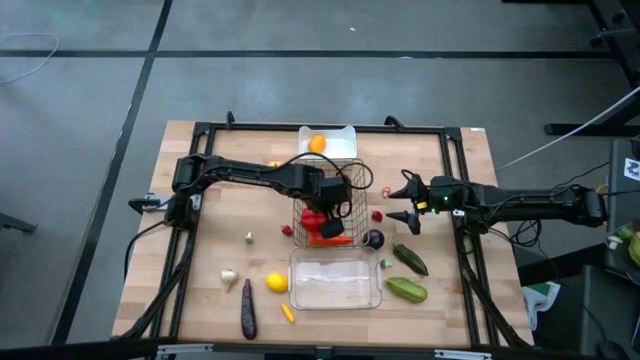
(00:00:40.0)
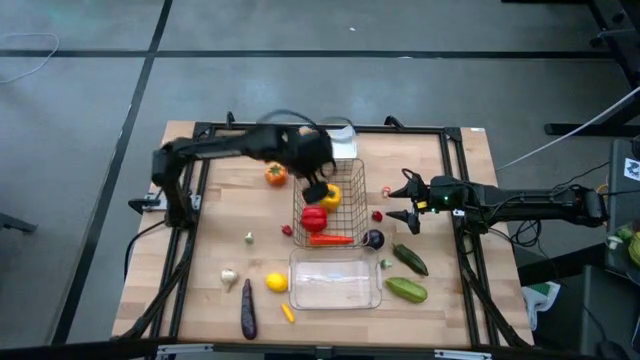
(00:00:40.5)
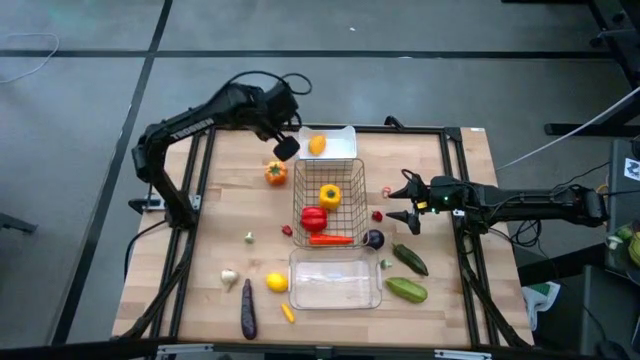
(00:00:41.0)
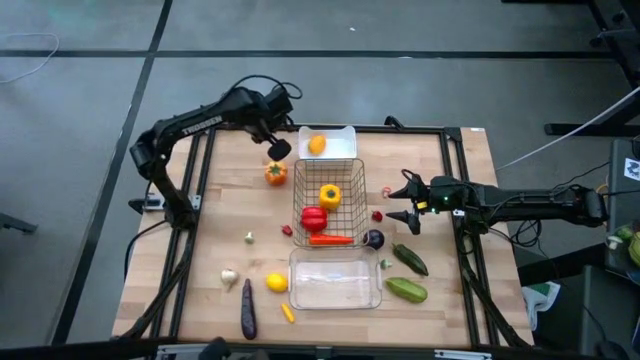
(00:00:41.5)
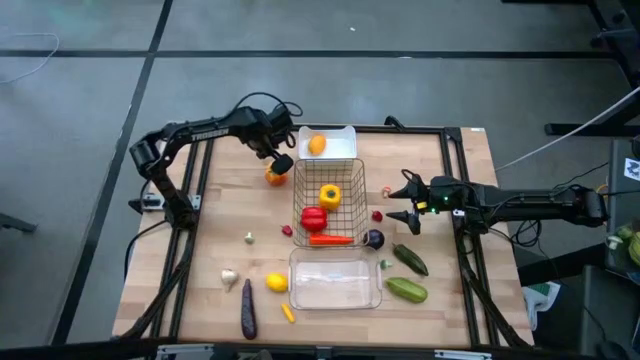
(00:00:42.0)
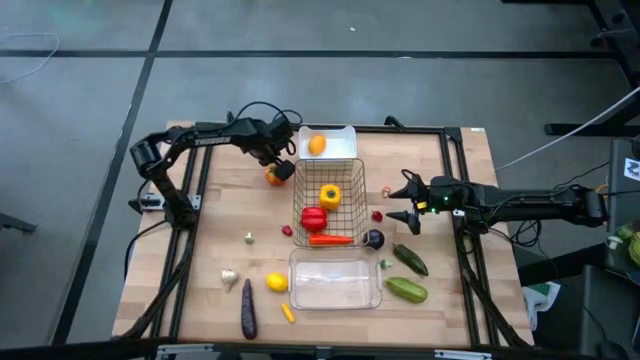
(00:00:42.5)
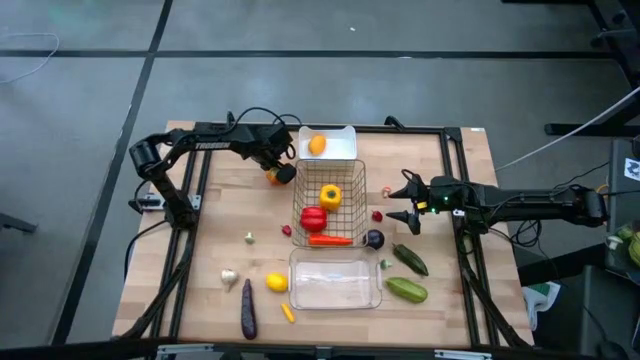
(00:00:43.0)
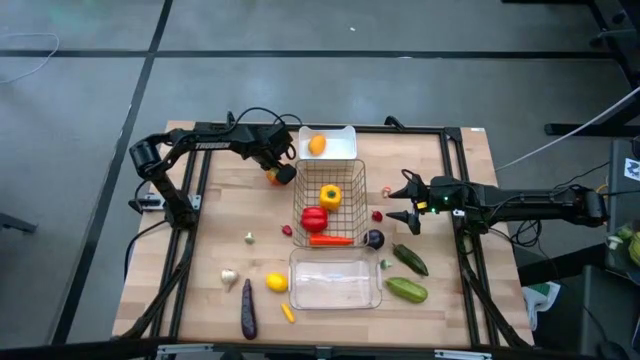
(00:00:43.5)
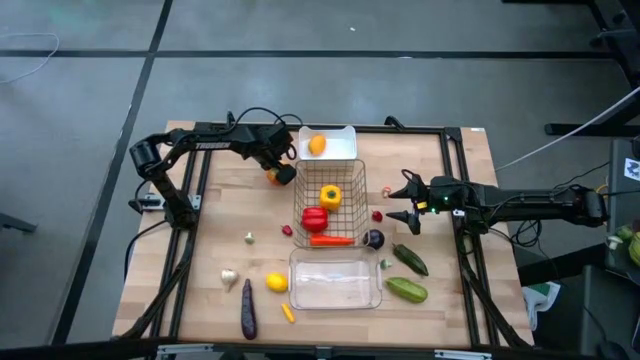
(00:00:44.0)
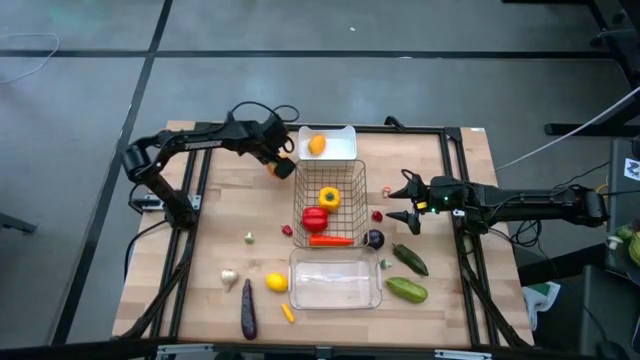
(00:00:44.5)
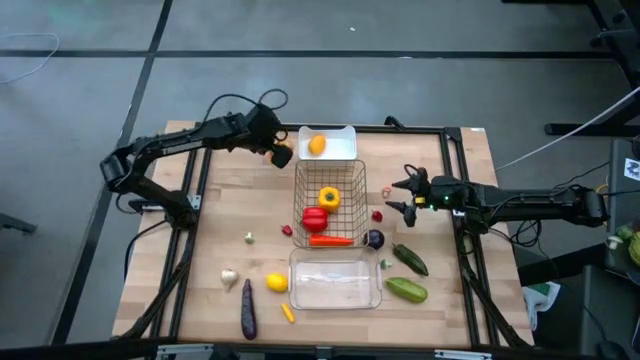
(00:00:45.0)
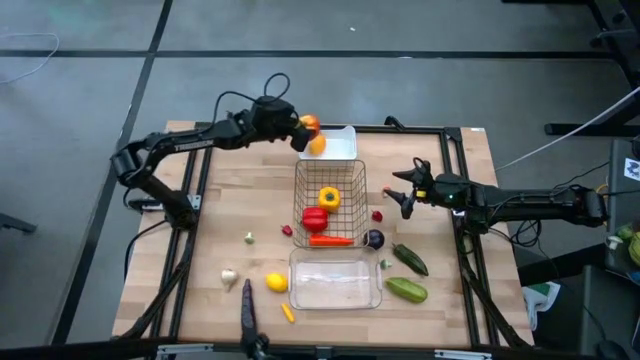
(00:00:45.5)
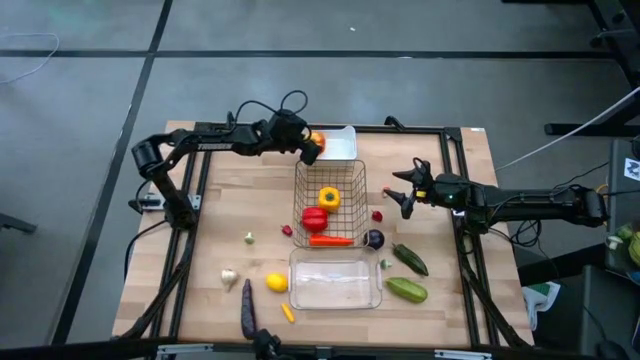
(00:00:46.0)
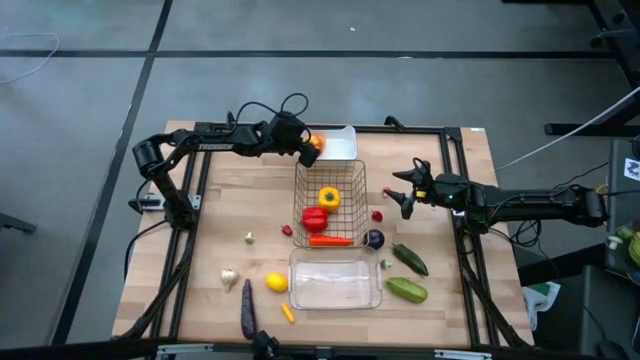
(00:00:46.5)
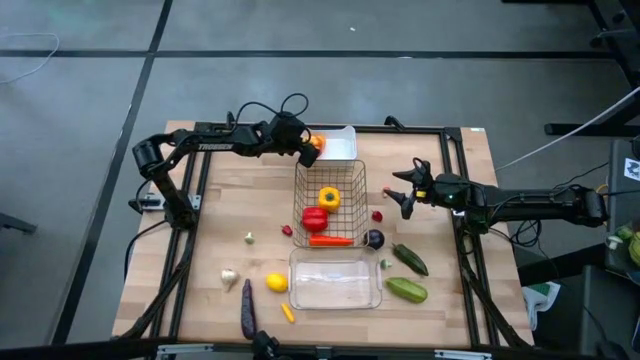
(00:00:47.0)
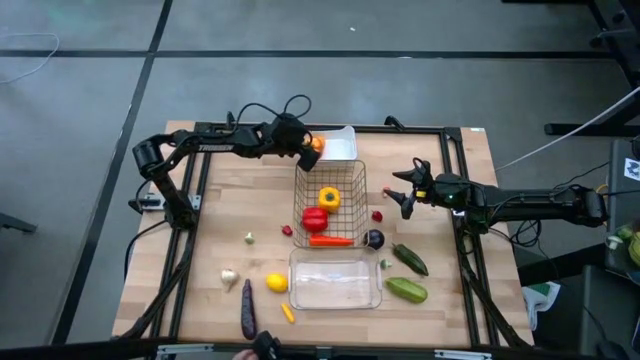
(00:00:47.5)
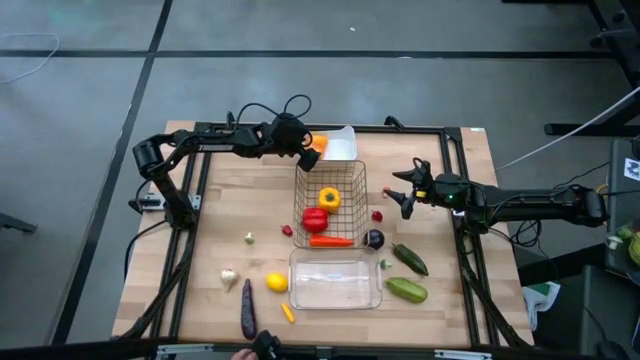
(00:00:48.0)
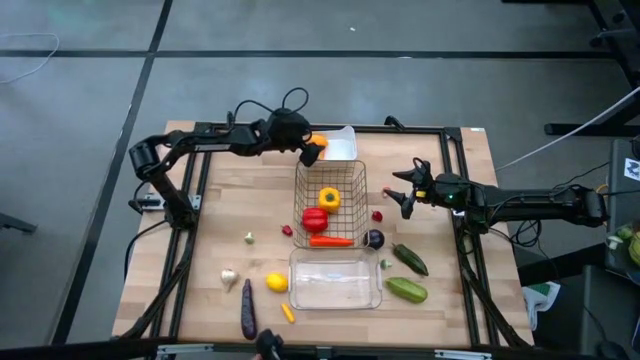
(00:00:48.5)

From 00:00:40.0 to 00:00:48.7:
Task: Sort produce into baskets
Put the yellow tomato into the white bin

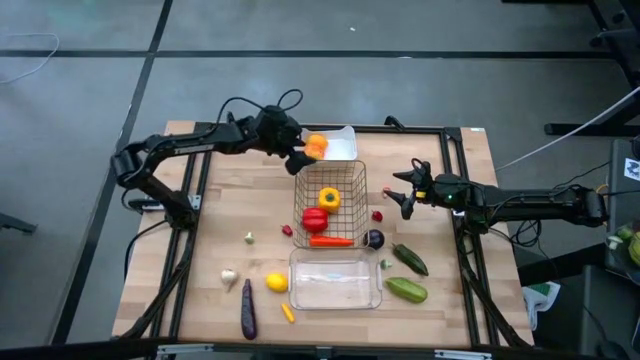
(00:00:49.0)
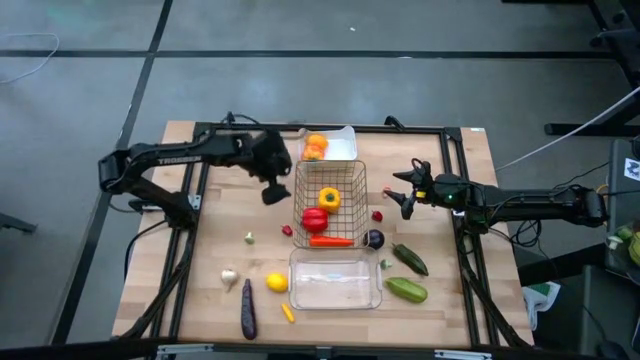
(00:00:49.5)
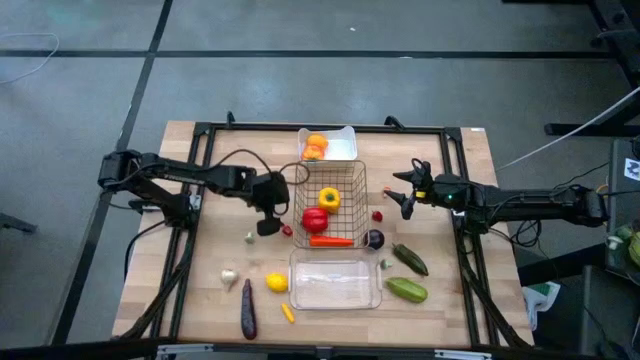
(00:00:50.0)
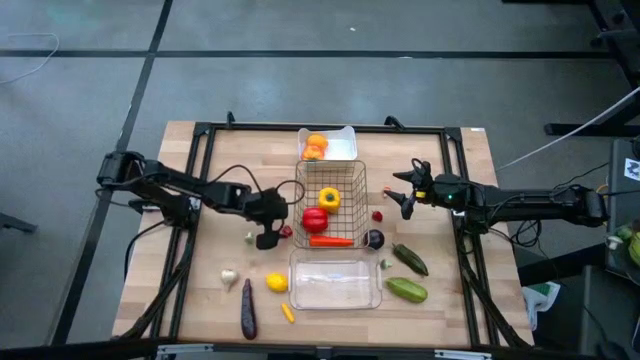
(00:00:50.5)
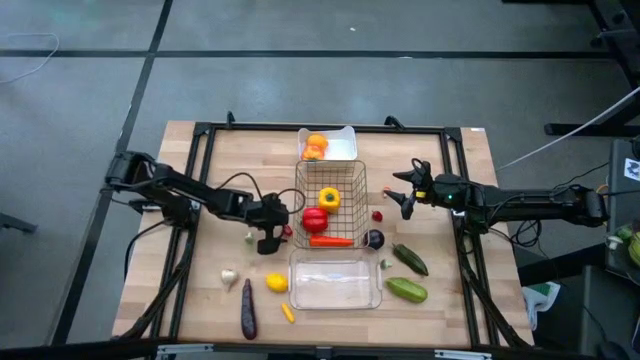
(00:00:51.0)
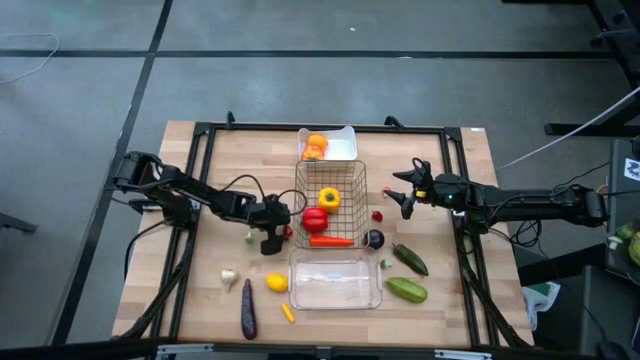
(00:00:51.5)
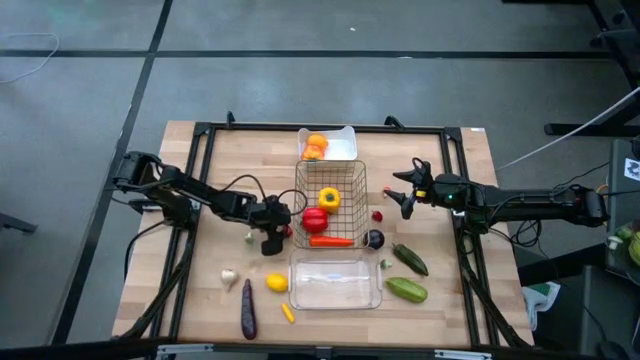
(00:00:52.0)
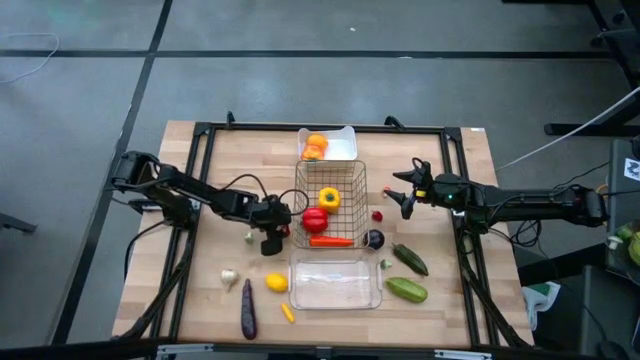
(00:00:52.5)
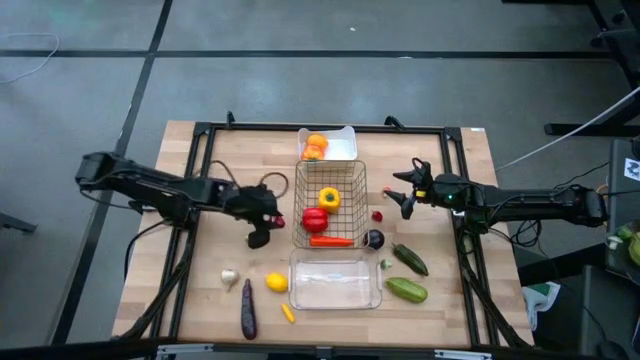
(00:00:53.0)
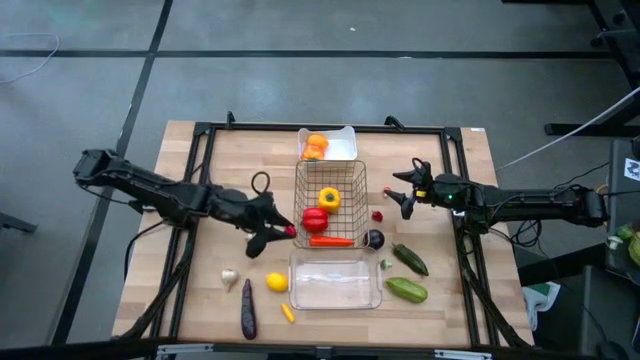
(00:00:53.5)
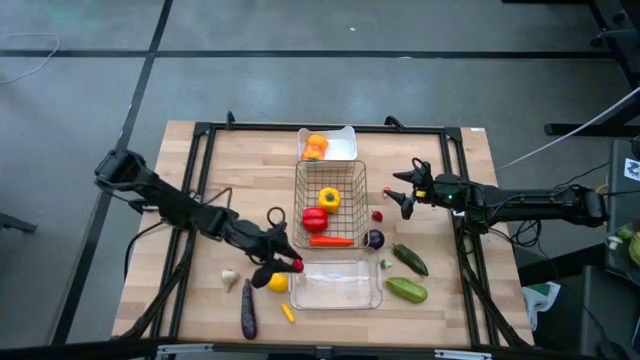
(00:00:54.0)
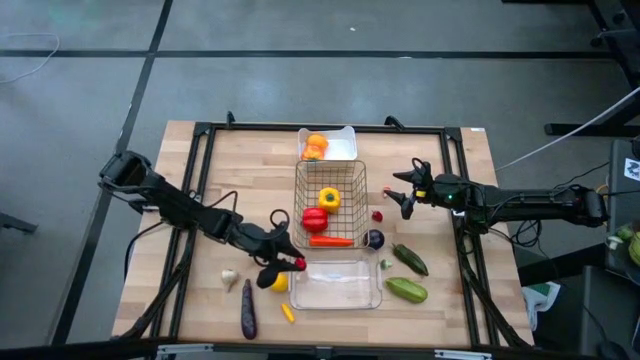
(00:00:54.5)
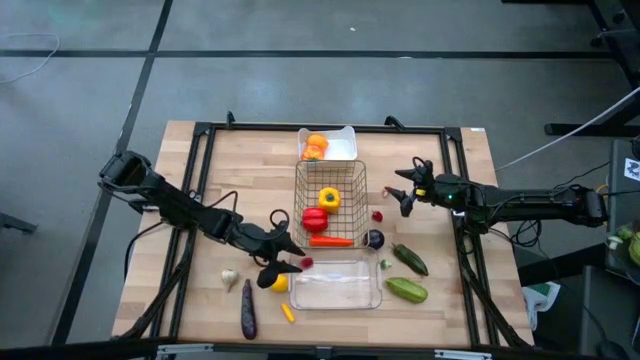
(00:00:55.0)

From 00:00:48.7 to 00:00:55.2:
Put the left small red chili pepper into the transparent bin

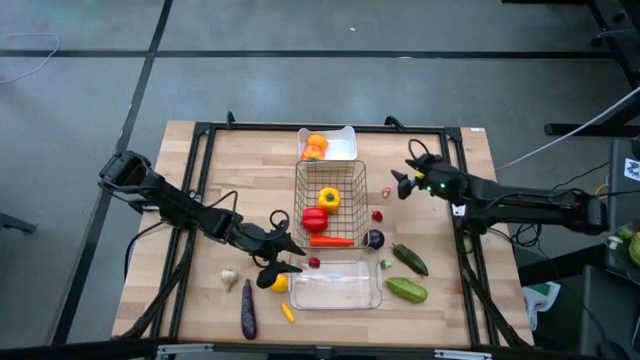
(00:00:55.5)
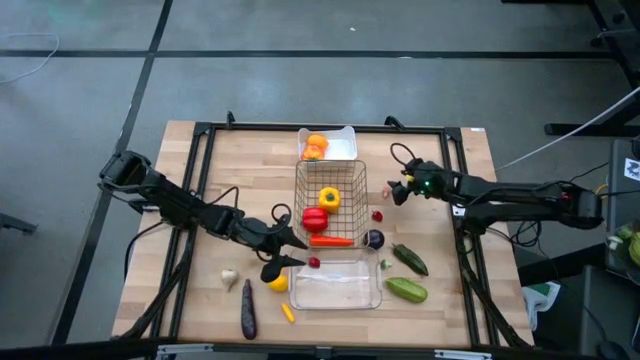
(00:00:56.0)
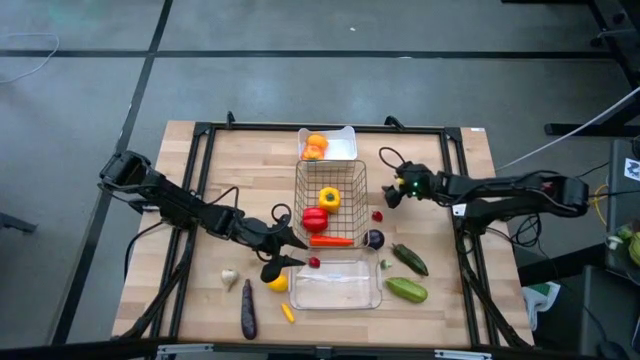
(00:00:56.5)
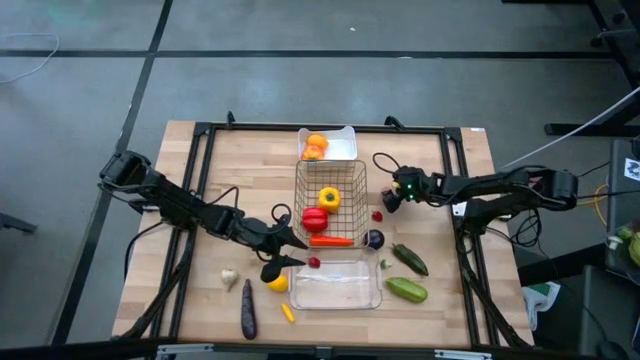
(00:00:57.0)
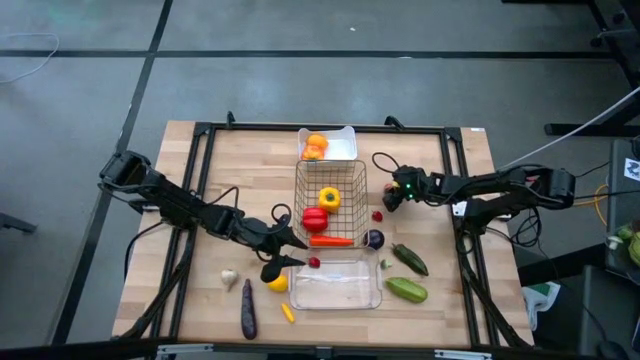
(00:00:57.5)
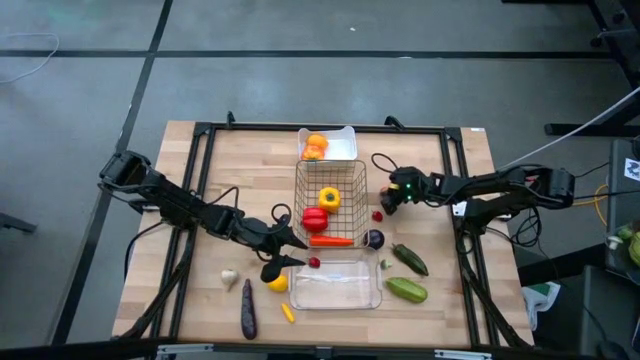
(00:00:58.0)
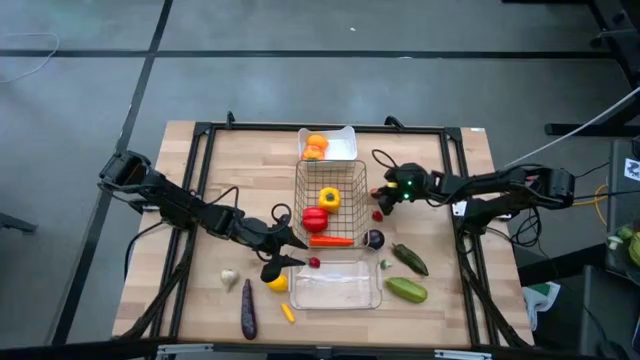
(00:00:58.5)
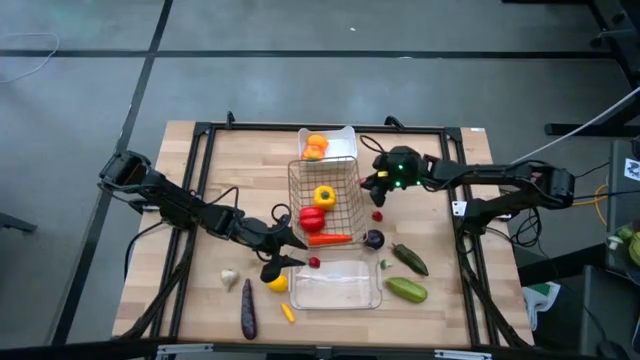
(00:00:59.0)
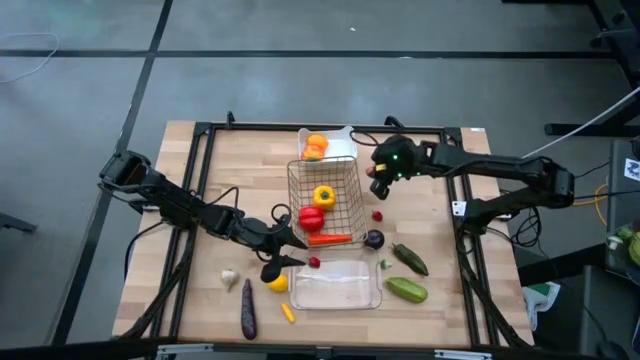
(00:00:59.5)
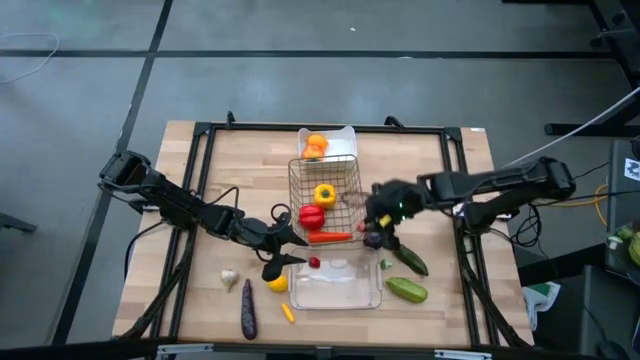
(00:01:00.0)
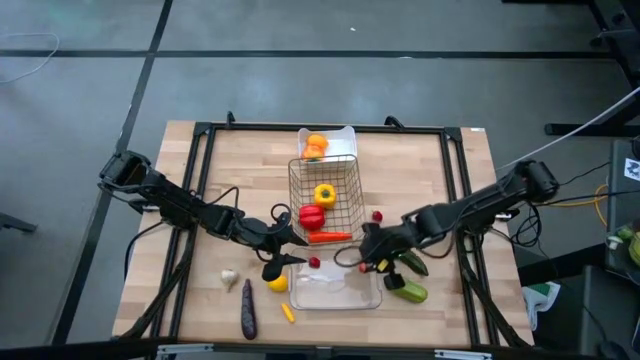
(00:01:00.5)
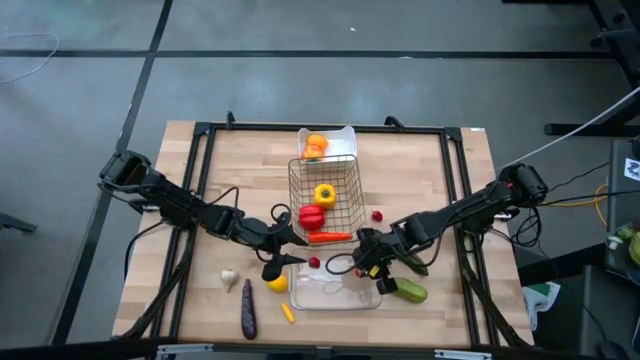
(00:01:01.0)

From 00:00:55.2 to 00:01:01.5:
Put the orange mushroom into the transparent bin
